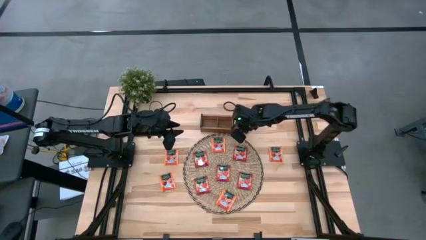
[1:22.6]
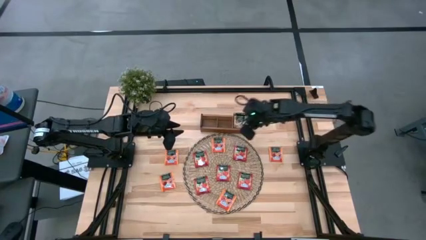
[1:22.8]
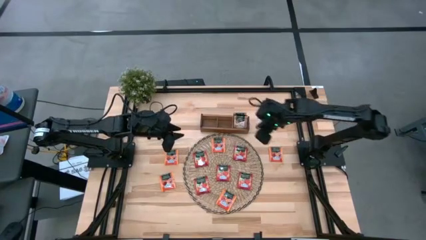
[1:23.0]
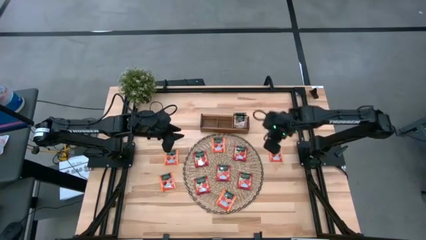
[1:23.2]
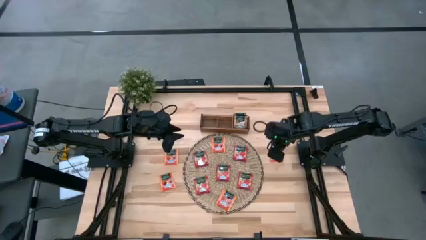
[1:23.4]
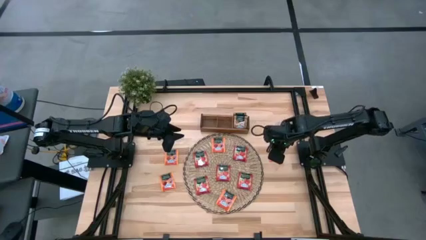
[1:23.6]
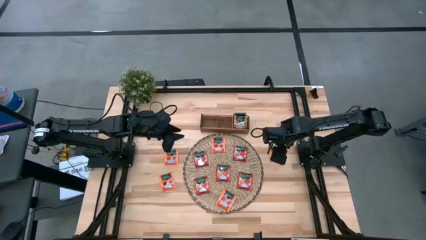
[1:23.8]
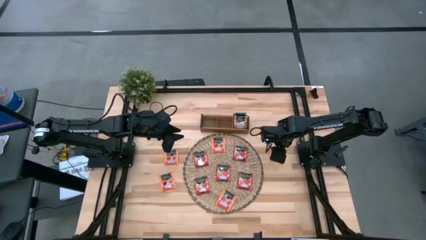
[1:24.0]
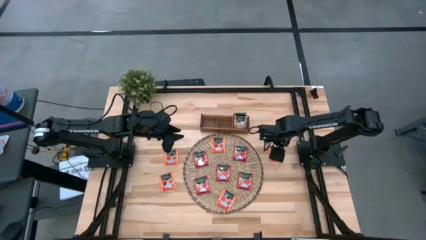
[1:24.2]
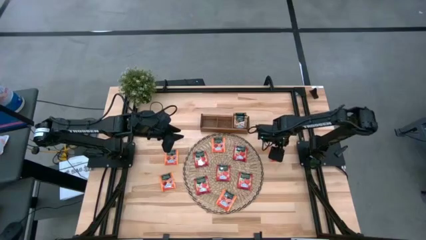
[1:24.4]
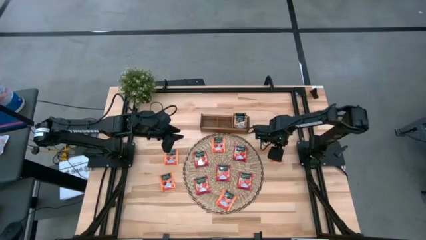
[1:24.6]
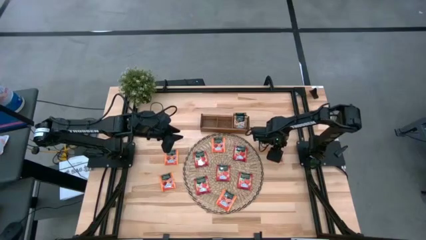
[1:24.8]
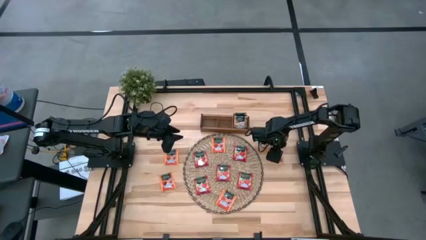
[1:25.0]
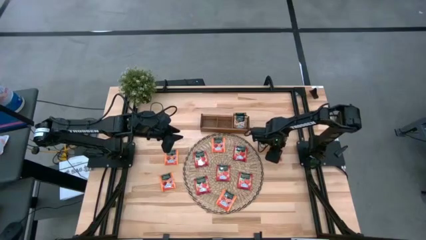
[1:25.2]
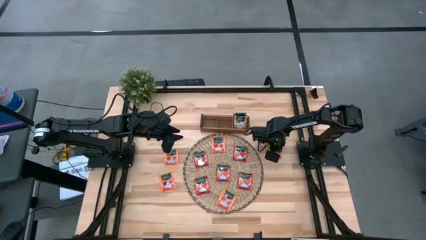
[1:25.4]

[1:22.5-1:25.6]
Task: Pick & Place Tea
Put the pink tea bag into the middle section of the wooden organizer

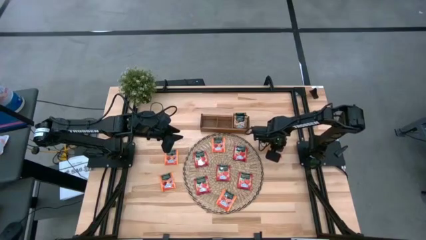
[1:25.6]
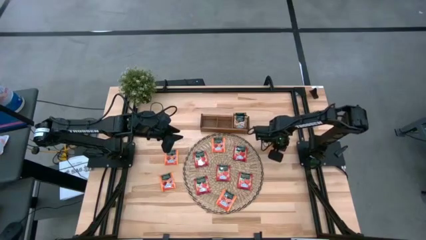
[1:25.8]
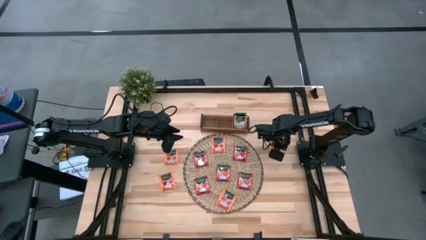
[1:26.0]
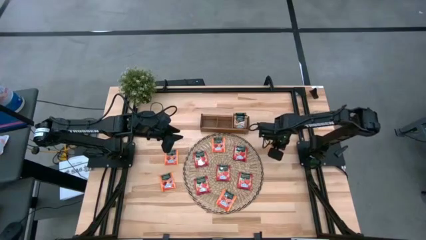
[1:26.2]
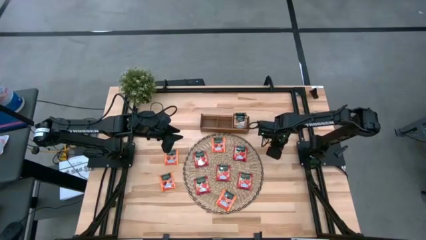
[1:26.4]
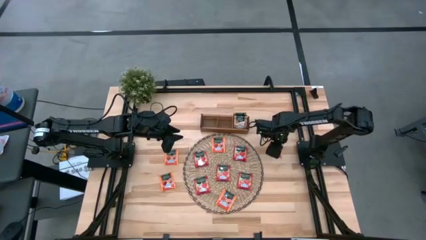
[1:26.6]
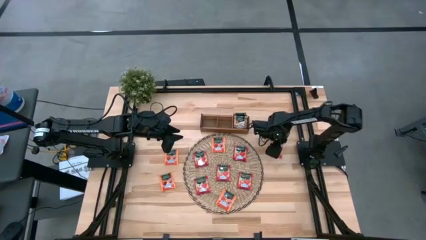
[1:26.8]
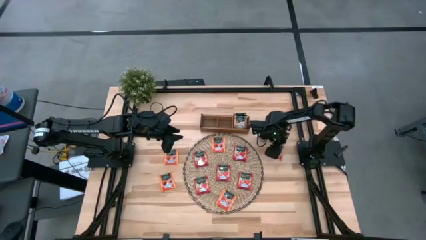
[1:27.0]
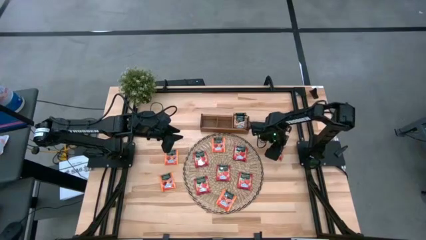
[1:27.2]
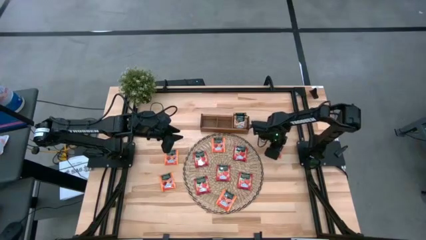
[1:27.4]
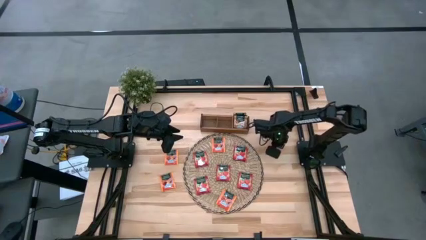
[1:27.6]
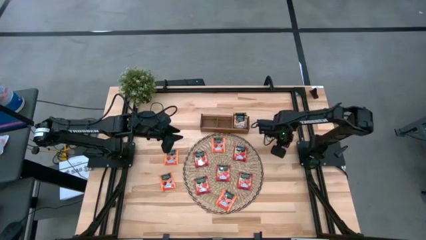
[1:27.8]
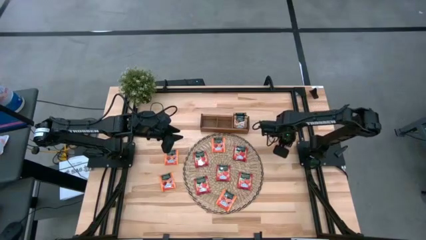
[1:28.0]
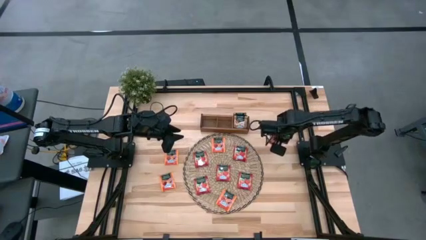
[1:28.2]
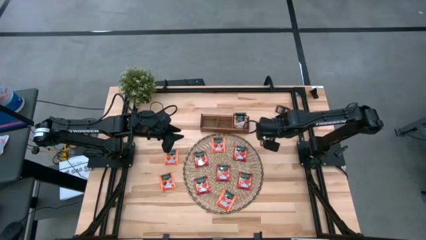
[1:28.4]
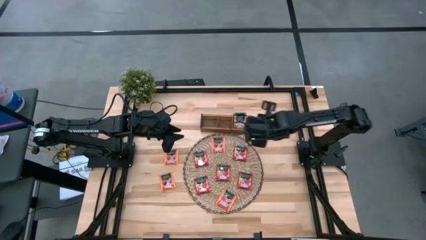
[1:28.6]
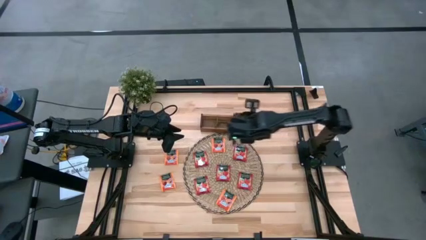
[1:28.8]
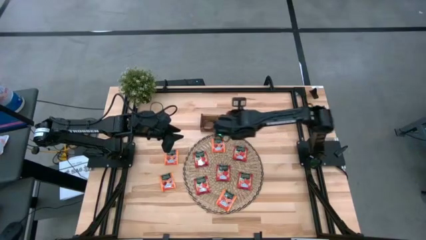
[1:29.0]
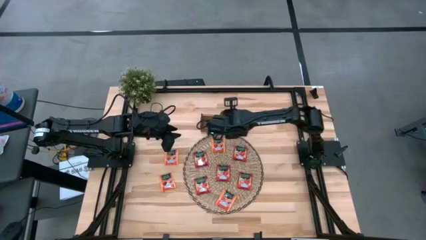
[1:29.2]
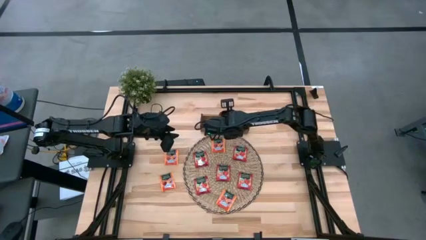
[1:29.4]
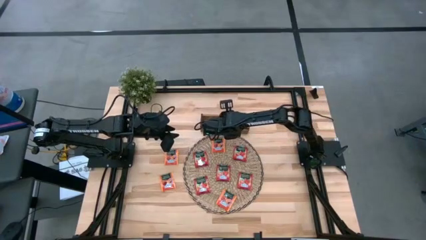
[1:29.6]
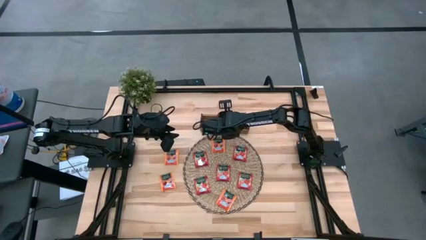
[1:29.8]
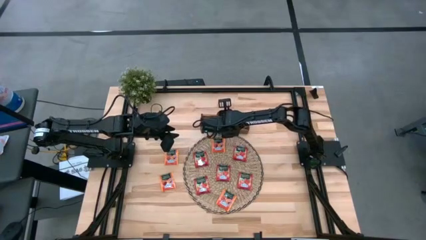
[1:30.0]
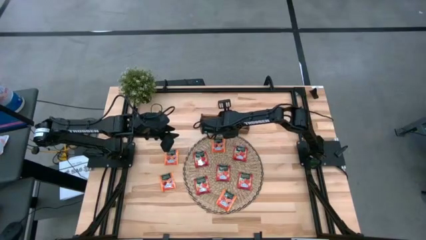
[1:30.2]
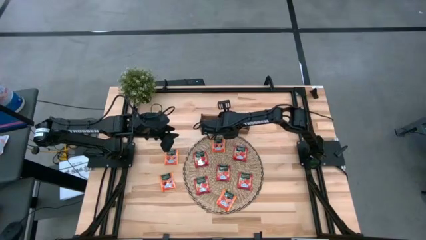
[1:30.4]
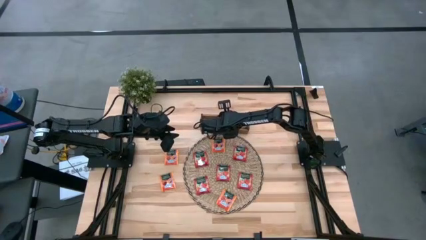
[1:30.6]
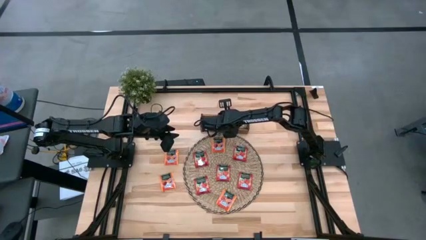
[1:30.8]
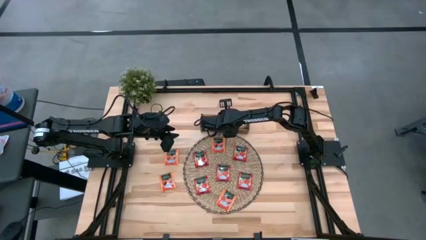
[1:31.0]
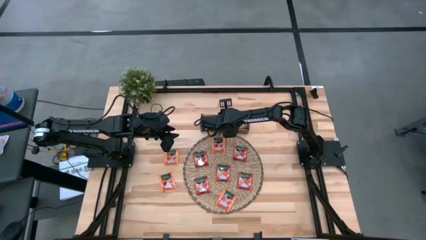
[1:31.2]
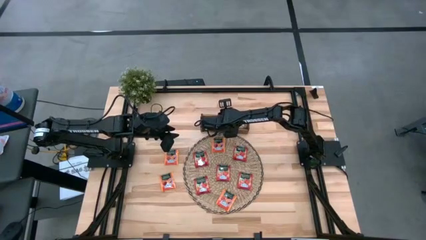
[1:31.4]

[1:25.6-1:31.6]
Put the pink tea bag into the middle section of the wooden organizer

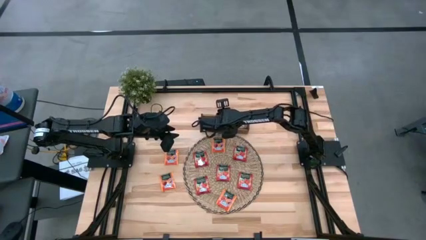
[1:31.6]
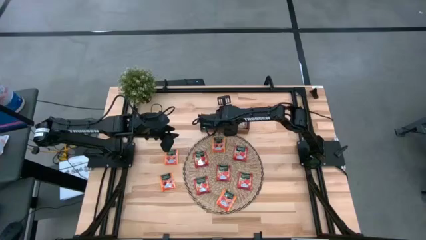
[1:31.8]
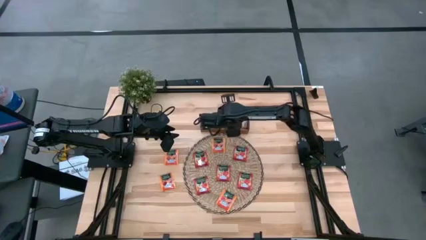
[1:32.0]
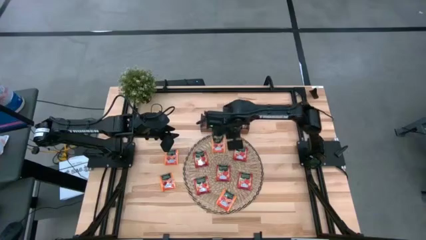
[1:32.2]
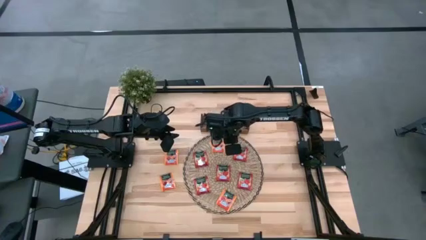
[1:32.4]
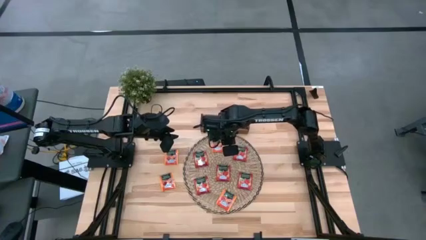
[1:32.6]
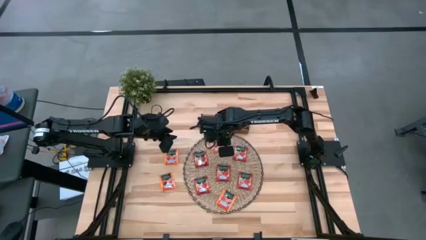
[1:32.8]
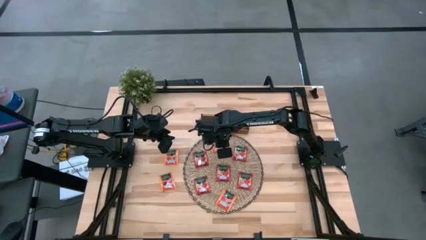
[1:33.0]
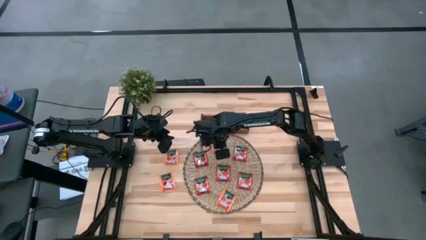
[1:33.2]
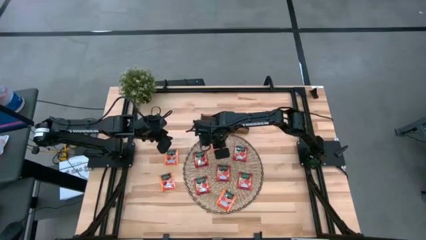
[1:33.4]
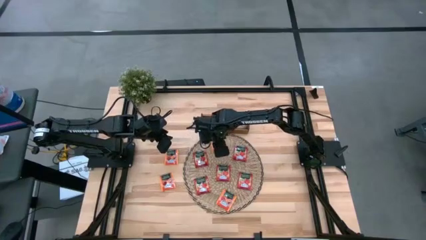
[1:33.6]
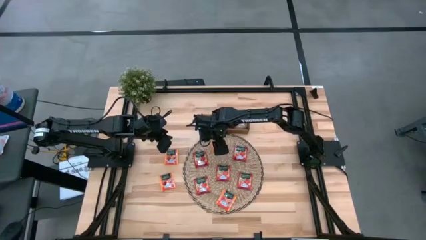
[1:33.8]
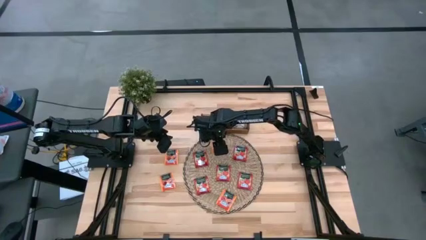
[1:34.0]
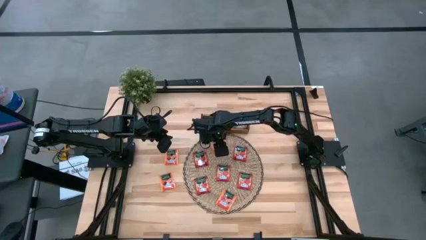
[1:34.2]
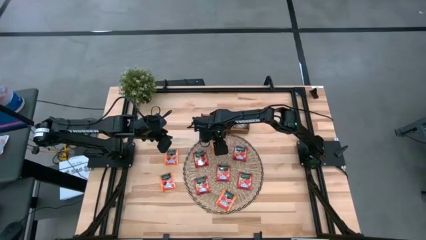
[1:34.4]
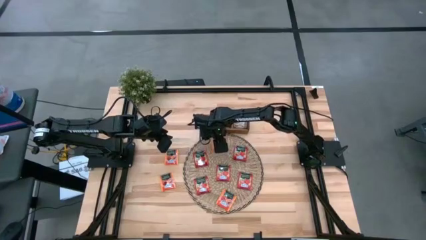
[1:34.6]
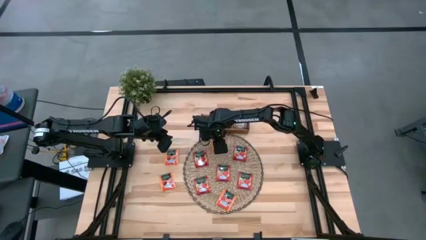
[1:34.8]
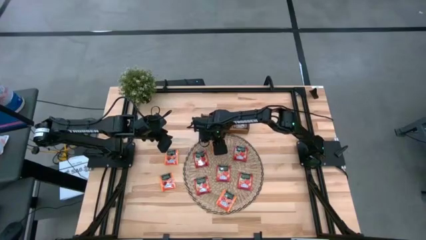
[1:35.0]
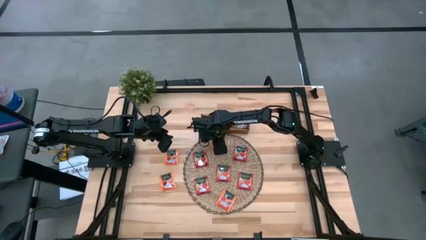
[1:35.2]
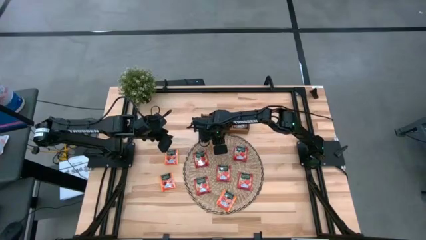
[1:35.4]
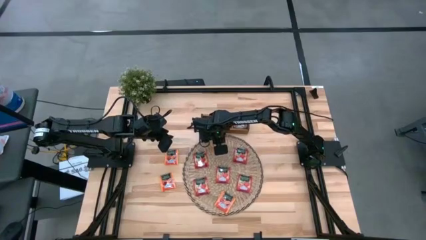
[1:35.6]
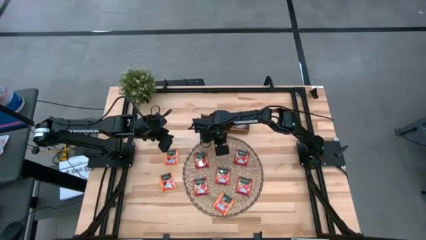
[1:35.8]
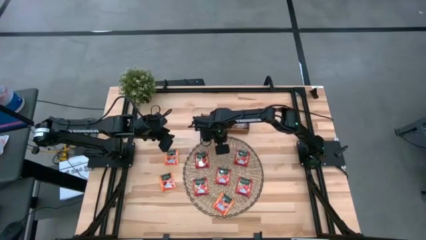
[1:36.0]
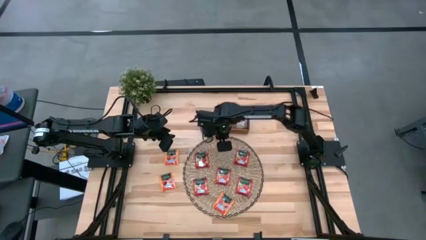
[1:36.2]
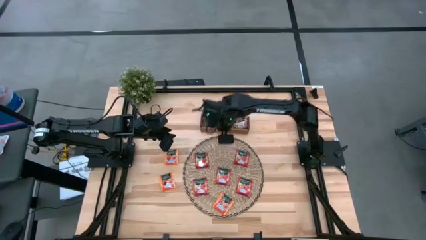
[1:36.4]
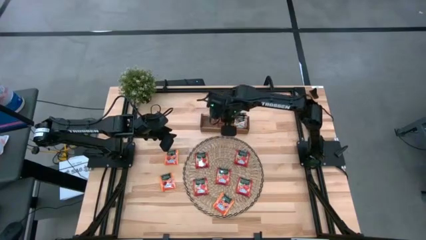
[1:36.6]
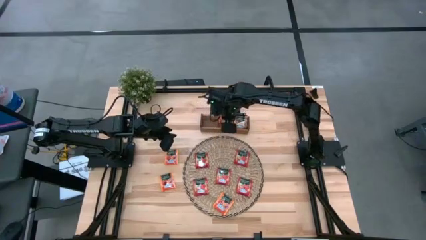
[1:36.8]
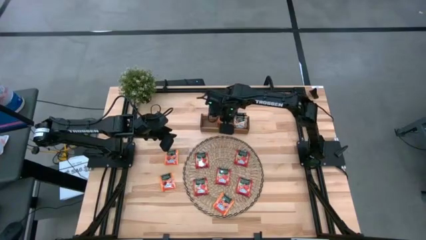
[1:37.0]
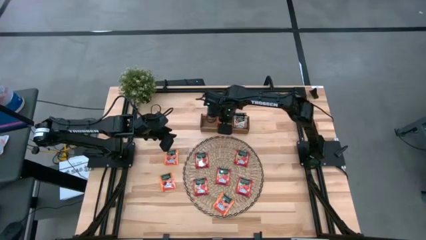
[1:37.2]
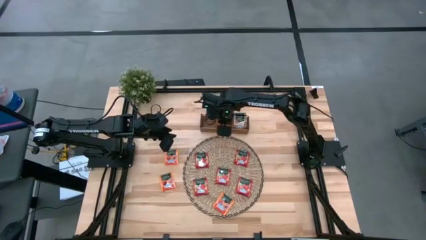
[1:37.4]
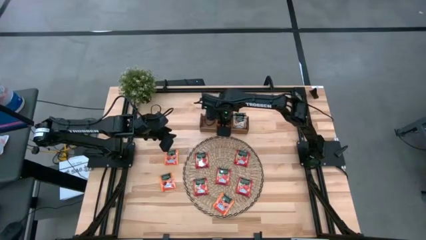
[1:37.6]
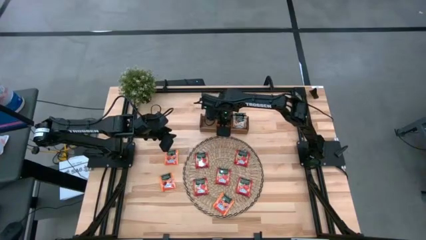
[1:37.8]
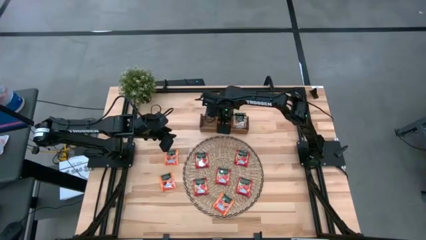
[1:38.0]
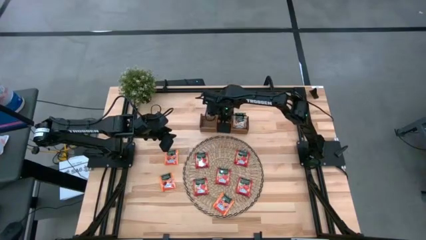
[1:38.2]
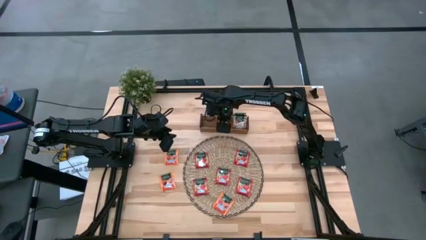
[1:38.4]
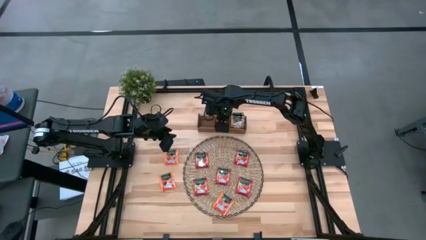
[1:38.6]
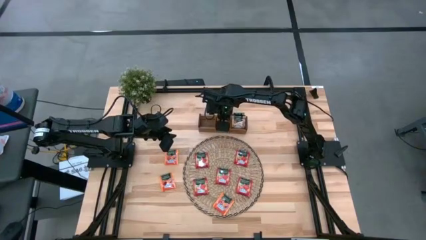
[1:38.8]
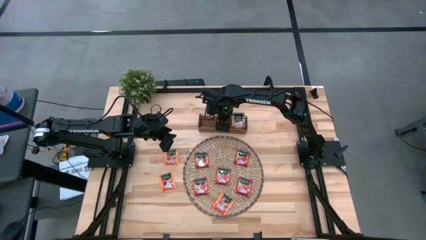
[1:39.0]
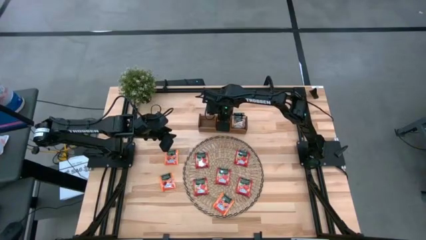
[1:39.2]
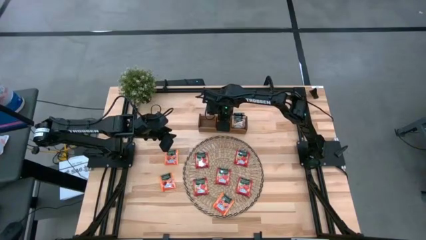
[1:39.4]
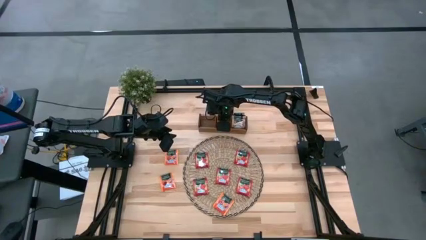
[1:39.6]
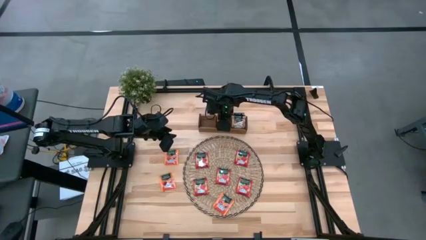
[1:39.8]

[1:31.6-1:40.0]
Put the pink tea bag into the middle section of the wooden organizer
